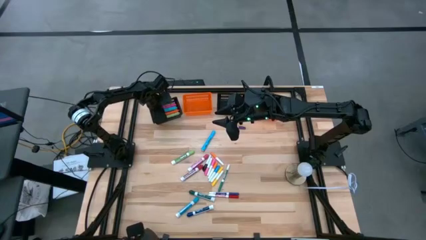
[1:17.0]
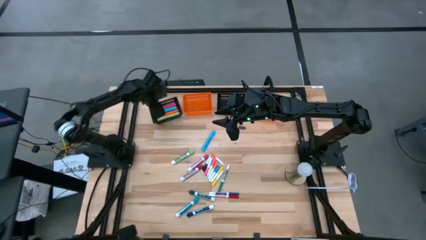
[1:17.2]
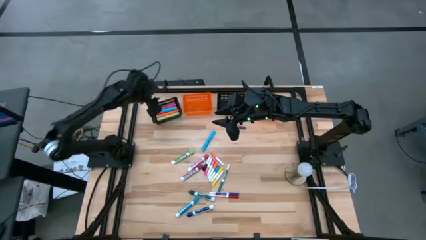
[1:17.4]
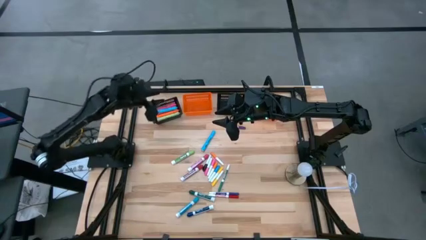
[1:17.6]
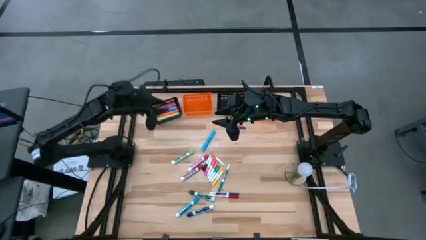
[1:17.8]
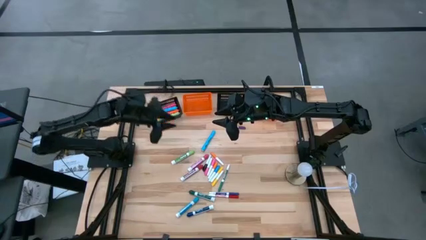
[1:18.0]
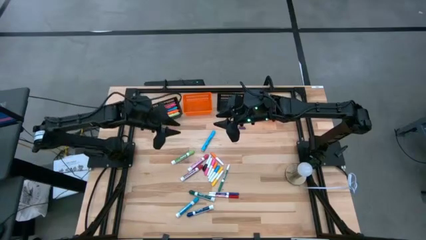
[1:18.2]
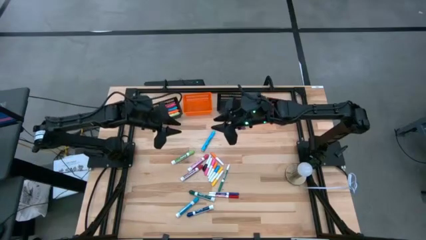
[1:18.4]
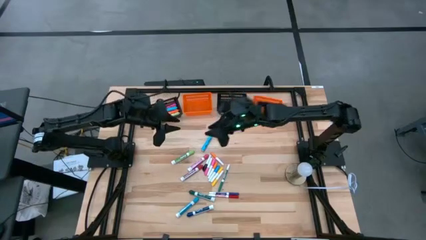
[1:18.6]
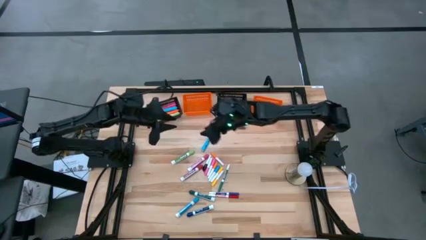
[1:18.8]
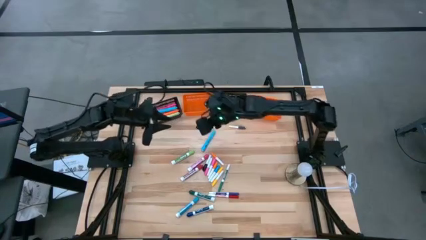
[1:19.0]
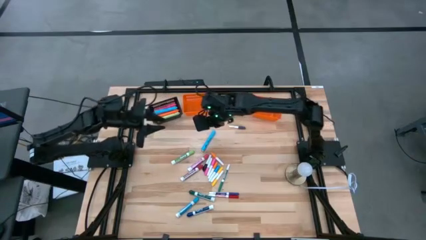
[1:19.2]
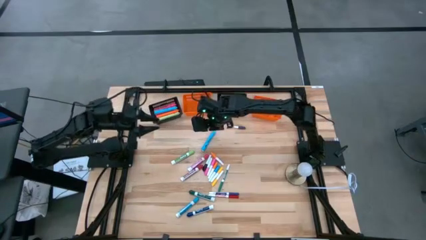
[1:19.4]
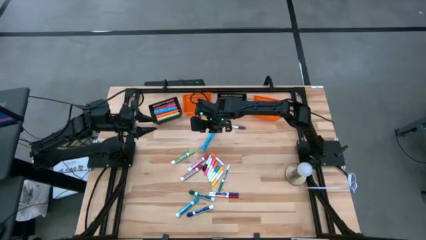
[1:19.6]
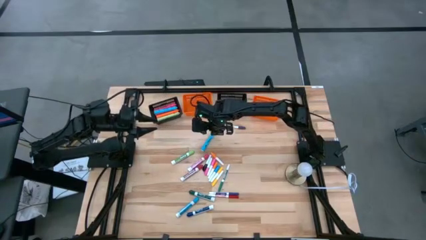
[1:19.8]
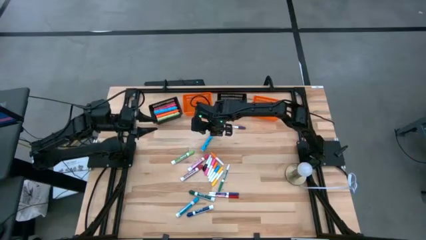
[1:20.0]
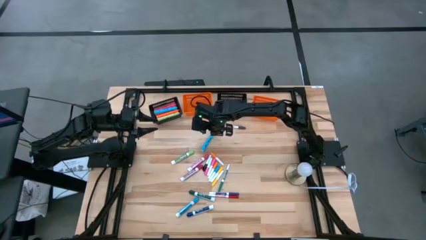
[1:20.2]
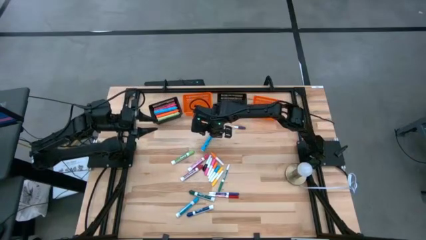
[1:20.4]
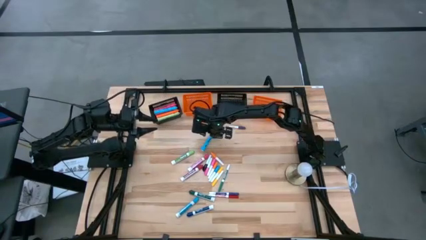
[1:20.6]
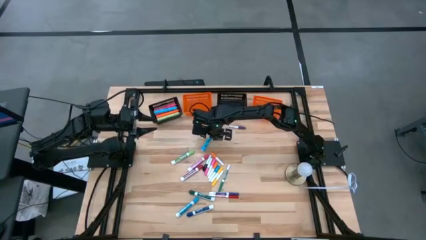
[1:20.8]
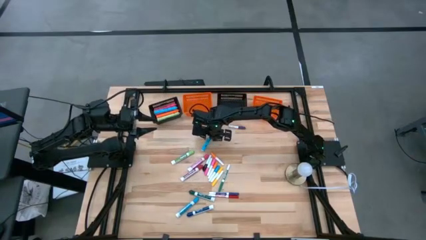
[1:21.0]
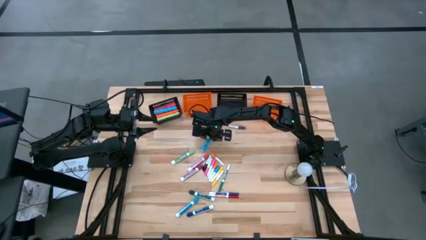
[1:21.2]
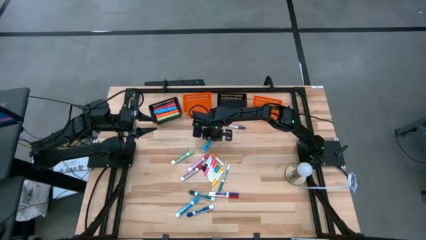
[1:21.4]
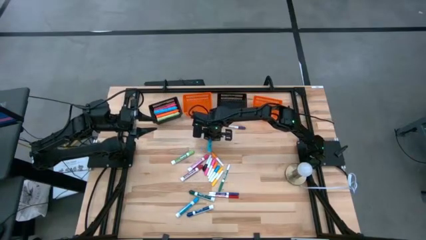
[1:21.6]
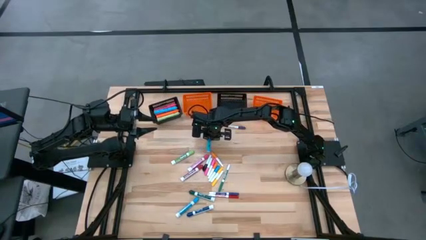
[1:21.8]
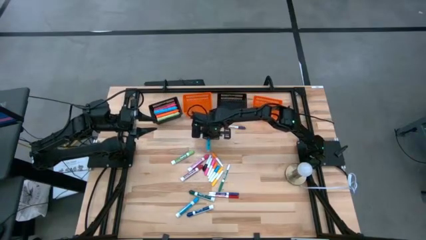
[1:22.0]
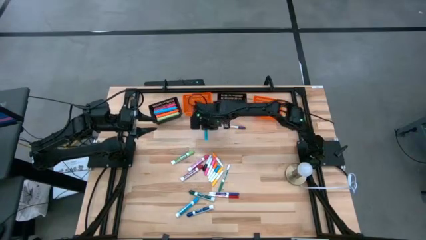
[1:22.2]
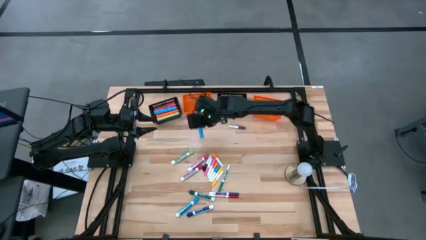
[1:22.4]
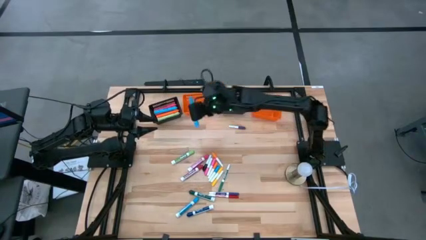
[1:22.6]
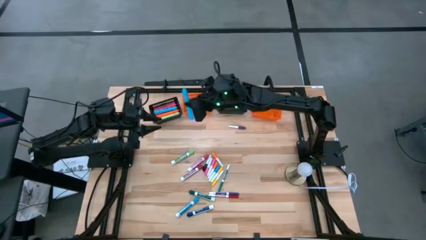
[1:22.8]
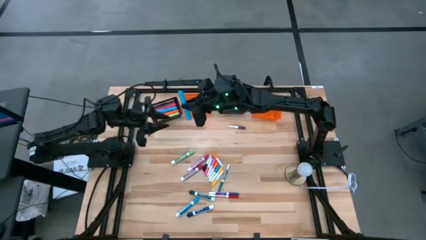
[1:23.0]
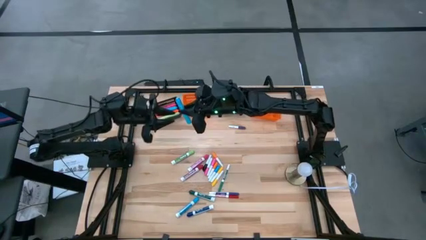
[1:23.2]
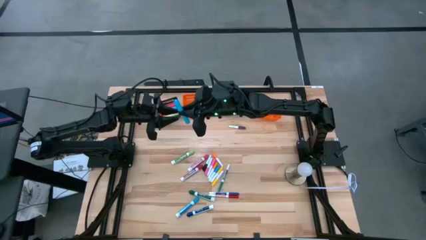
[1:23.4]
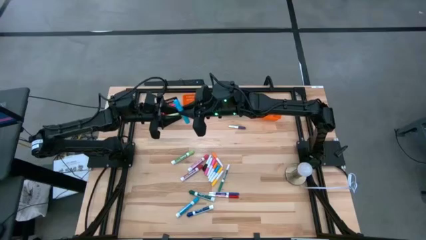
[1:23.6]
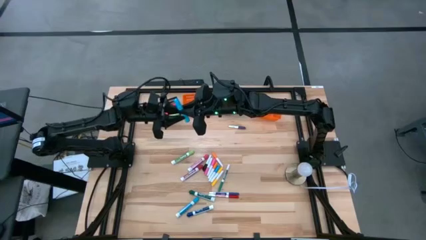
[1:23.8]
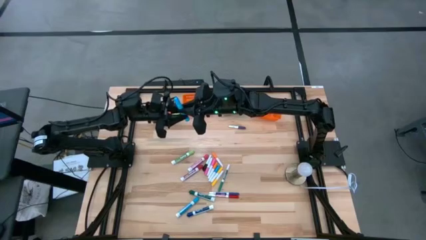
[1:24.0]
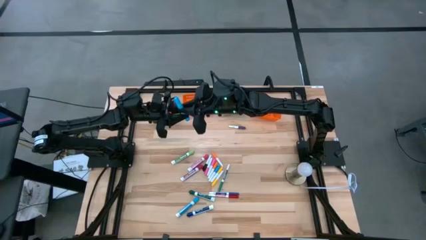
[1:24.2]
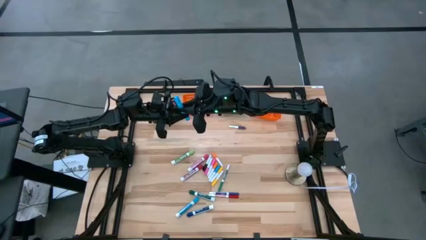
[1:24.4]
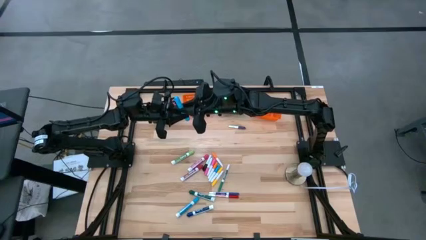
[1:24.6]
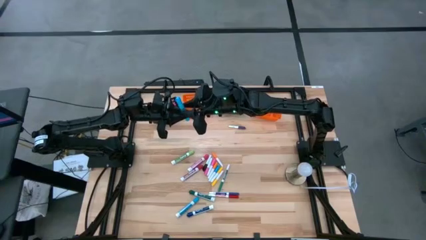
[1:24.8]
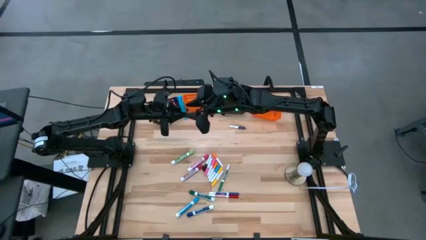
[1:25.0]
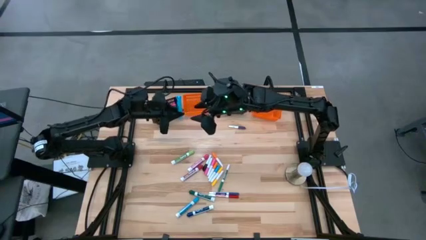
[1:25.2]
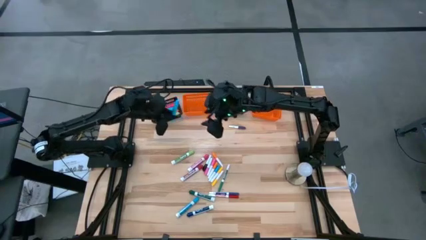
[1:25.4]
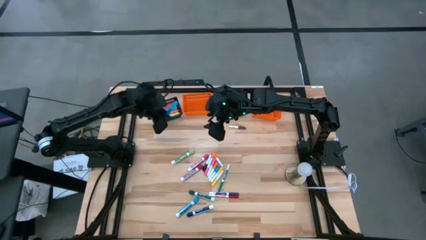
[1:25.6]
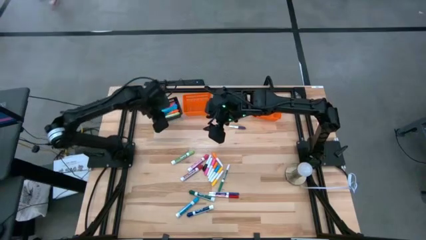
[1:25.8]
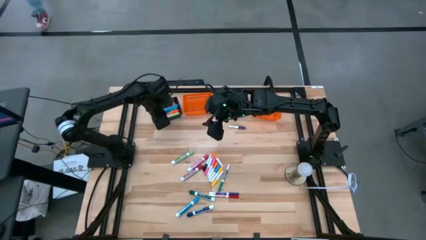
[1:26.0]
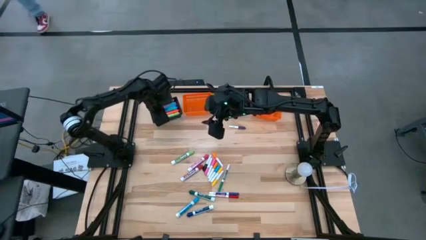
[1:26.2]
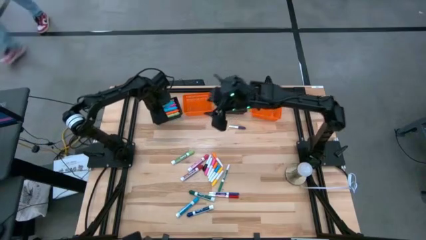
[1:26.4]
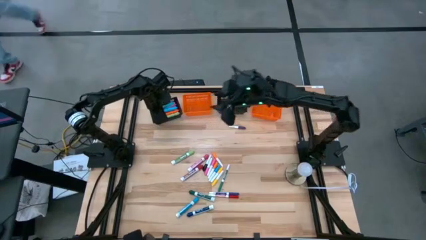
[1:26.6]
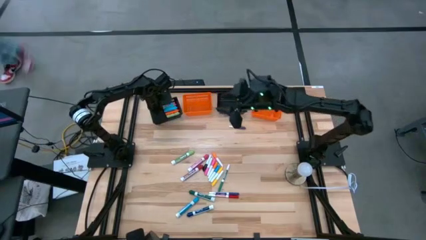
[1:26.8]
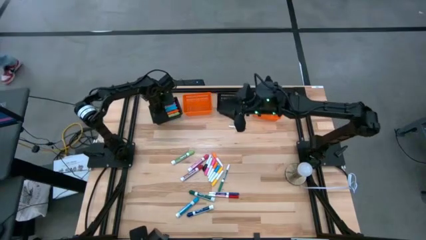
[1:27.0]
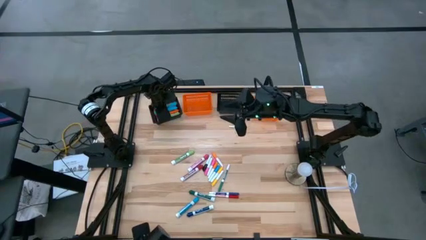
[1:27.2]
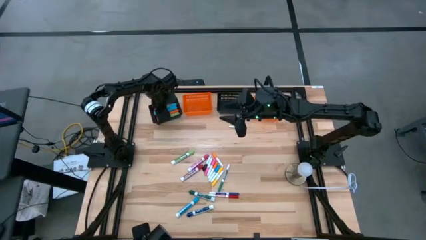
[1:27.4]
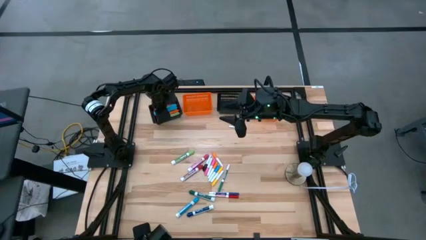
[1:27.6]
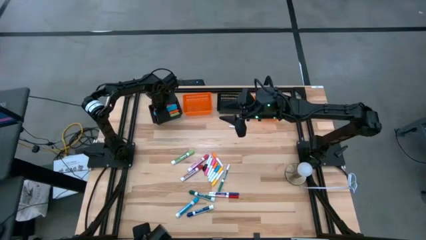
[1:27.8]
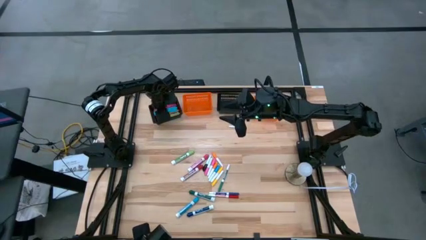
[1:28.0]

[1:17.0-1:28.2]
Task: Pick & Place Markers
Put the blue highlighter into the left black bin

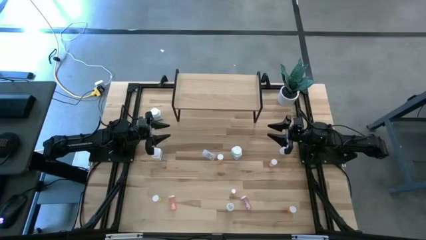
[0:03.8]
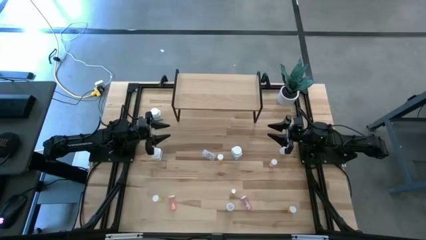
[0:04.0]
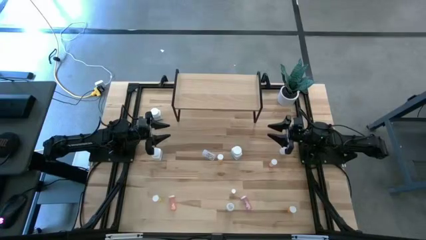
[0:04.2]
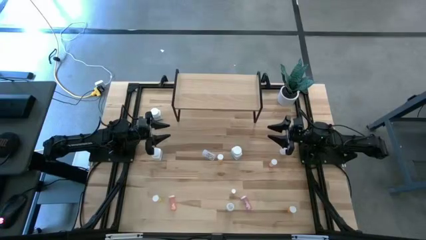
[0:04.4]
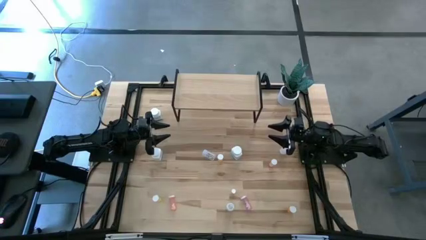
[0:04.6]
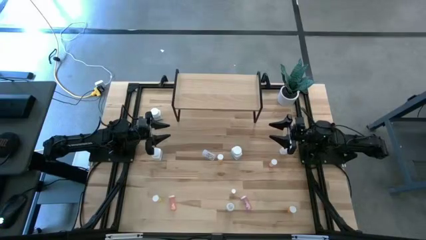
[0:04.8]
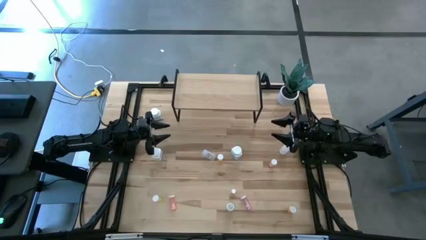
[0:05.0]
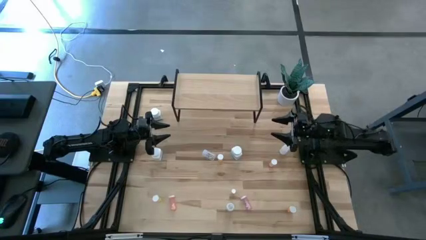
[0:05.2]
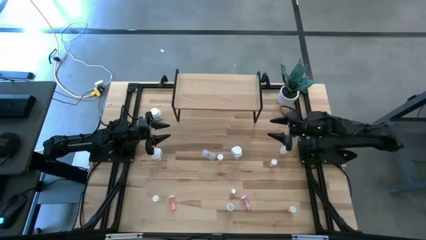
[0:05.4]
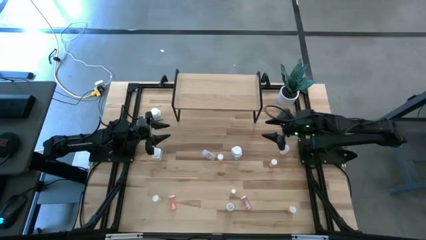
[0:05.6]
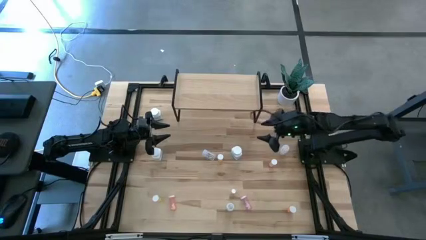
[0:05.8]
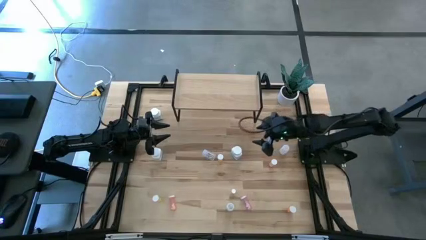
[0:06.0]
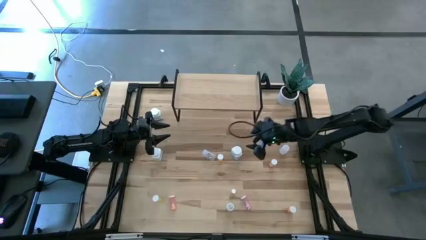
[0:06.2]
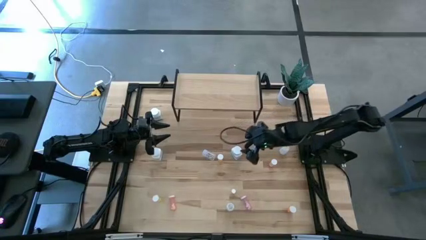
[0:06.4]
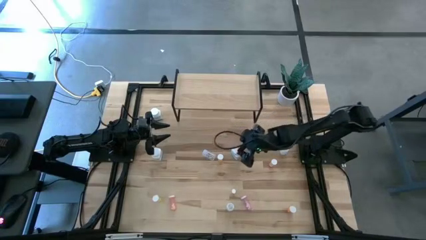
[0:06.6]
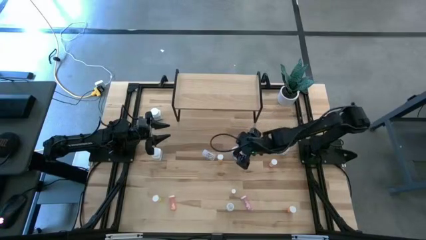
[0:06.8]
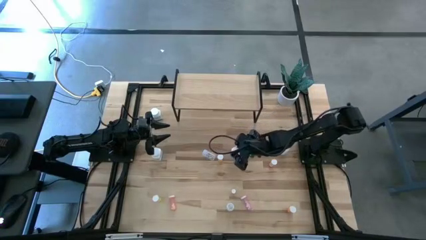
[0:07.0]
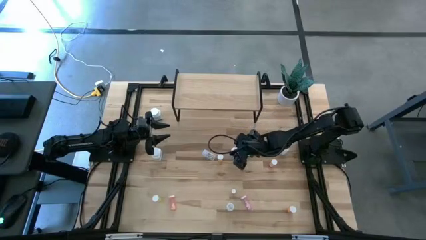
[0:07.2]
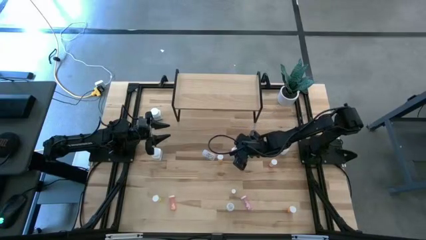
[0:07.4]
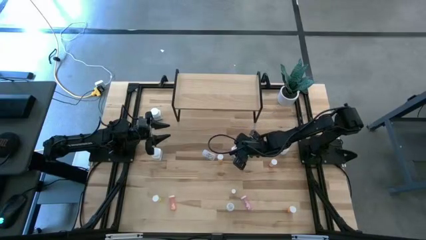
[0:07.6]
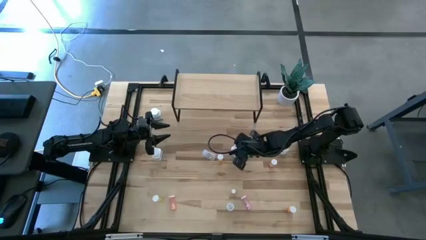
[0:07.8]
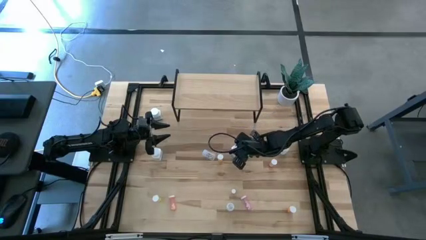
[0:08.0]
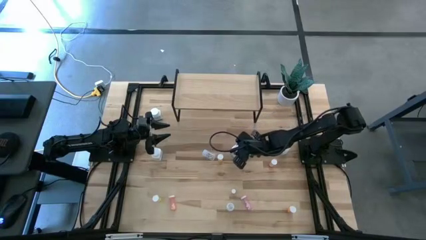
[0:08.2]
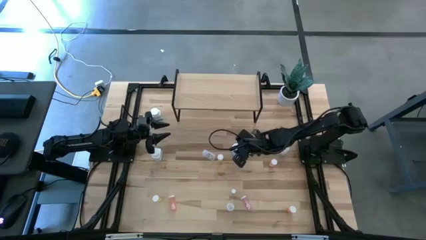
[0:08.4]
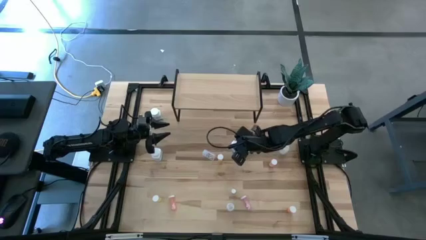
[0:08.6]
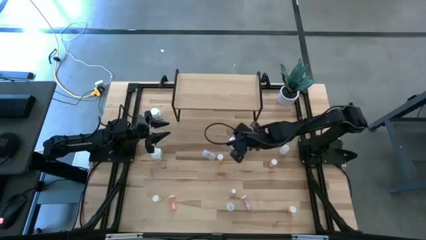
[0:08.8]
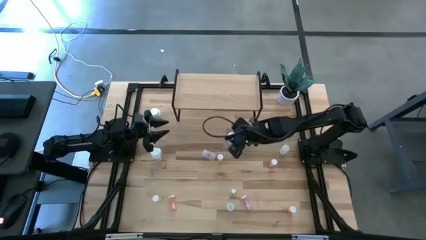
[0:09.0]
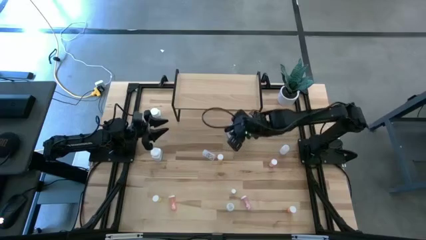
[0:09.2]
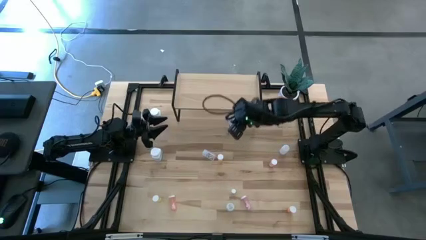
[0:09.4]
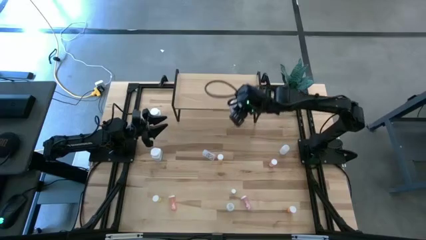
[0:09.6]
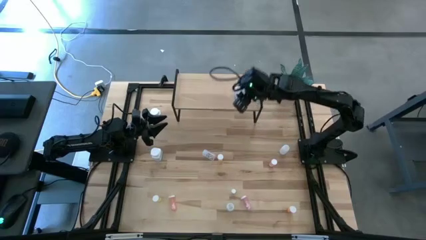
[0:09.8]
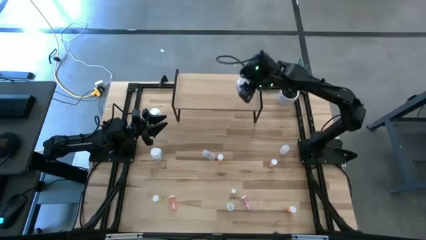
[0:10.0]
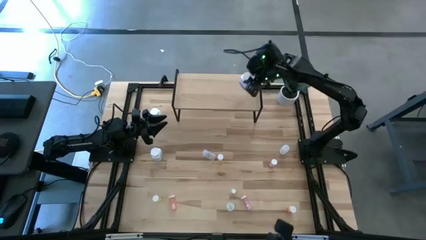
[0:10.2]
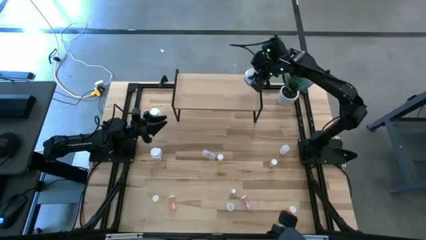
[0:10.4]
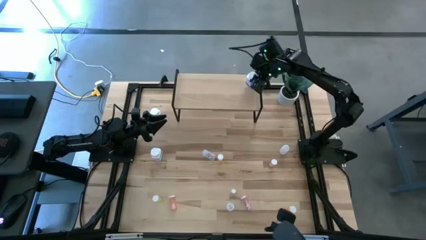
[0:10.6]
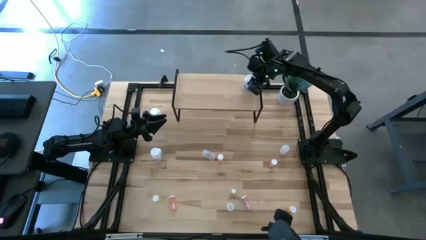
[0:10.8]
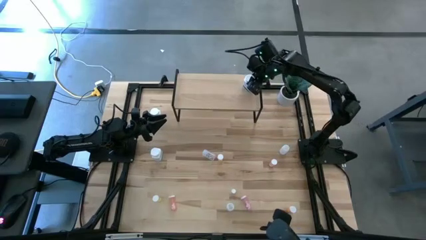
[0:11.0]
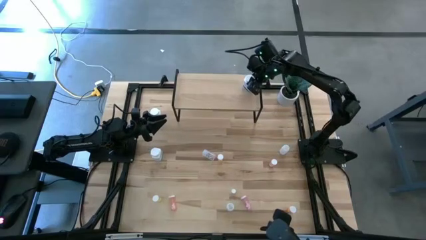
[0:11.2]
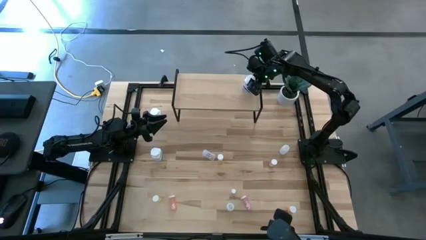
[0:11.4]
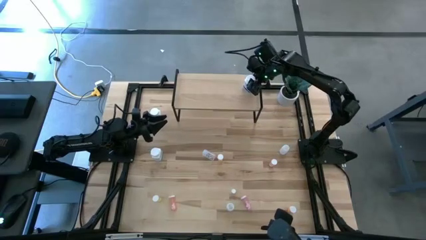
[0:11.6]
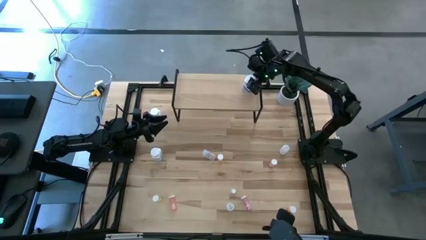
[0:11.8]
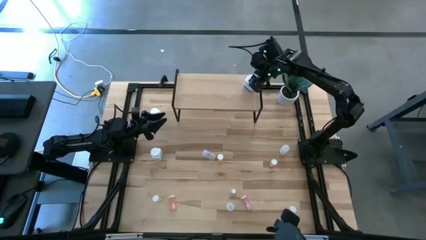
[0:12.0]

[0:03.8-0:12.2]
Task: Pick and place medicine bottles onto shelf by color
Put the bottom right white and blue pill bottle on the shelf
